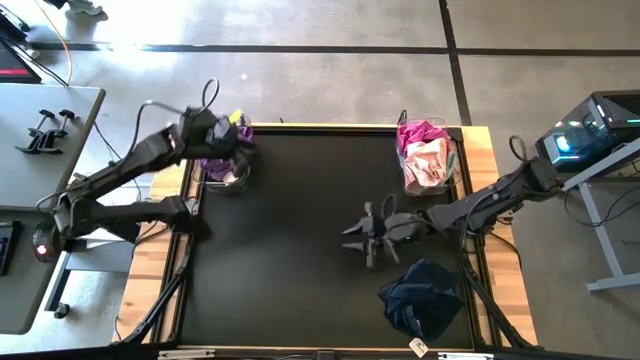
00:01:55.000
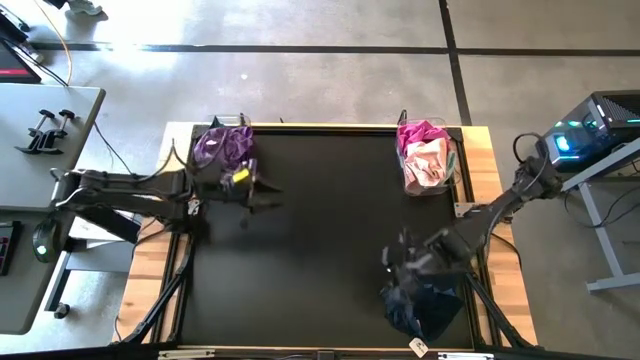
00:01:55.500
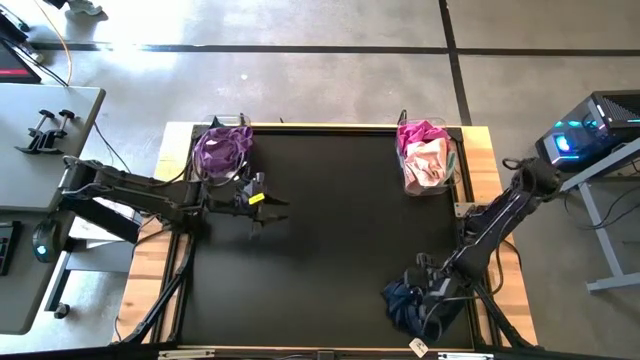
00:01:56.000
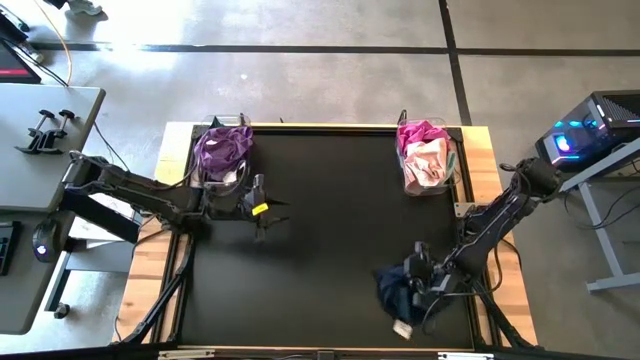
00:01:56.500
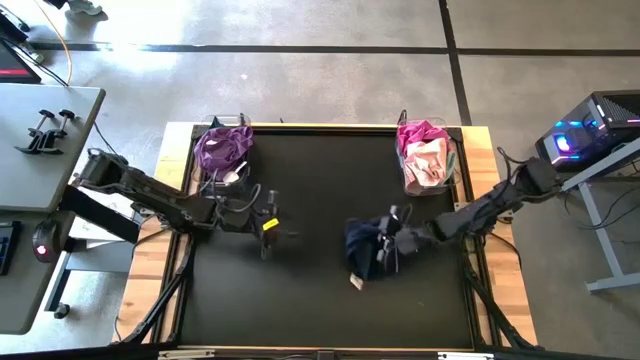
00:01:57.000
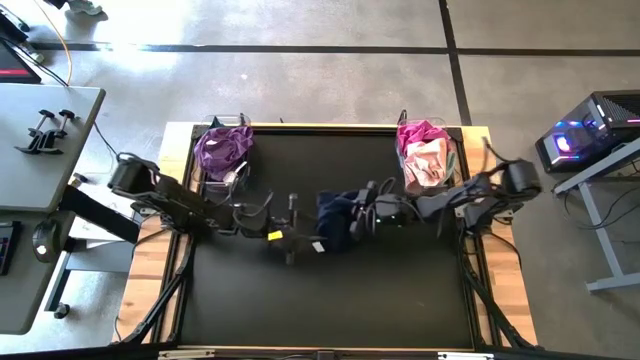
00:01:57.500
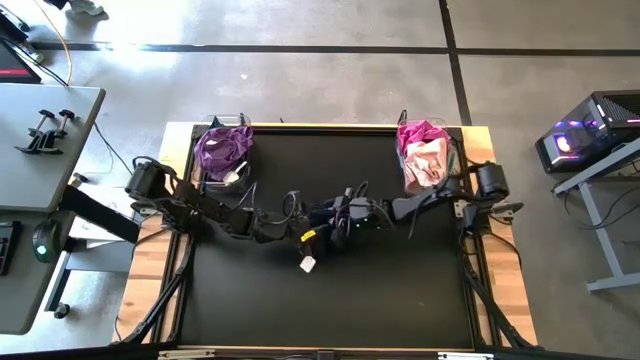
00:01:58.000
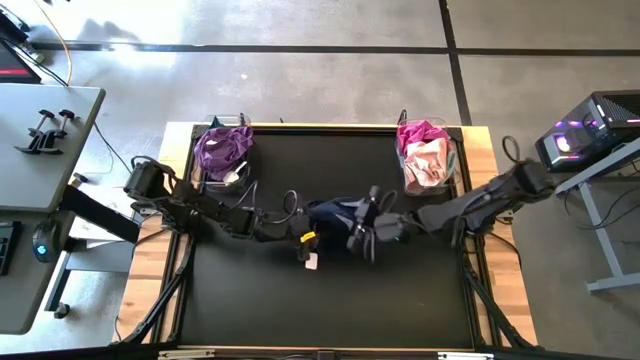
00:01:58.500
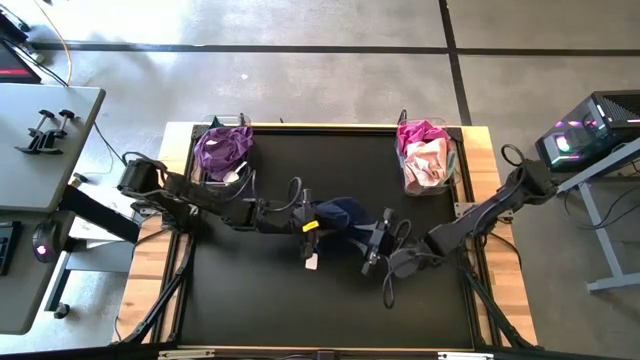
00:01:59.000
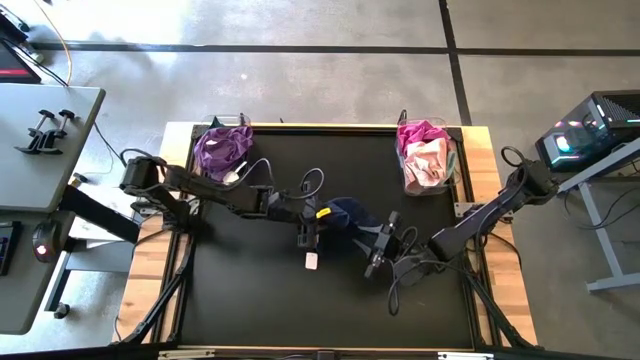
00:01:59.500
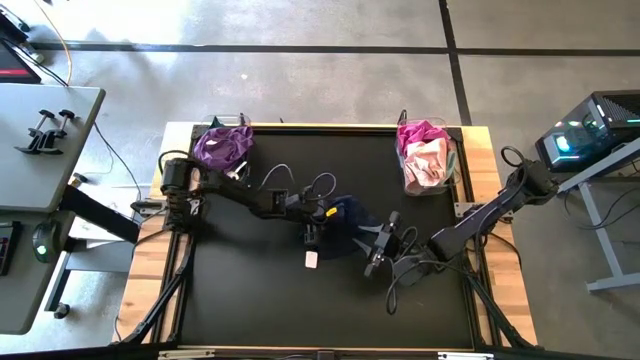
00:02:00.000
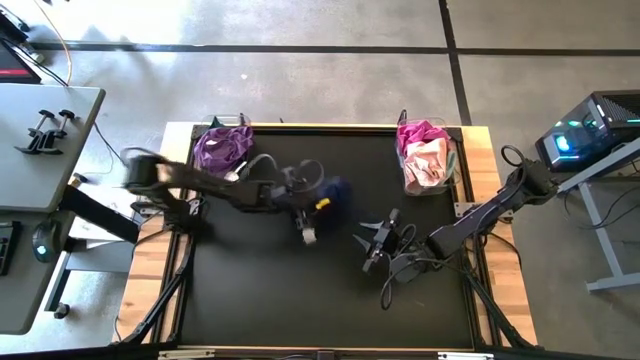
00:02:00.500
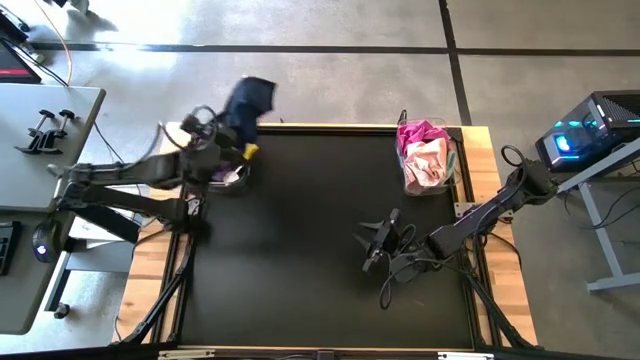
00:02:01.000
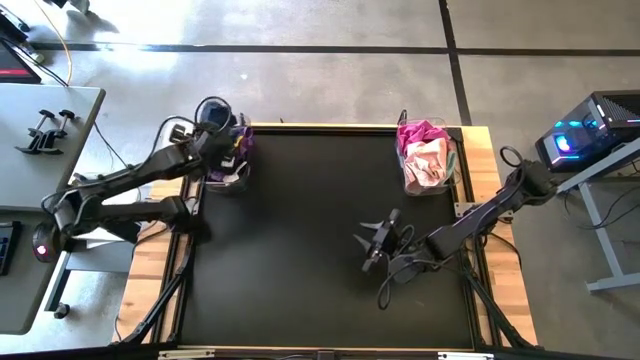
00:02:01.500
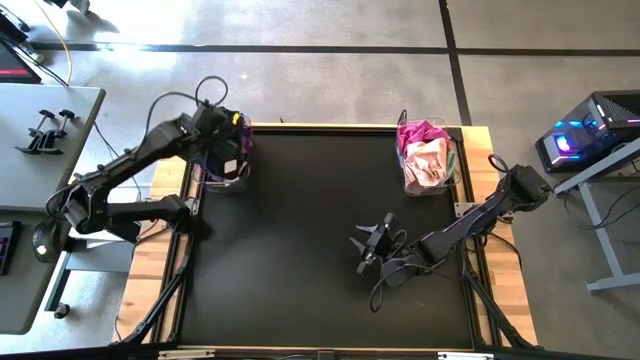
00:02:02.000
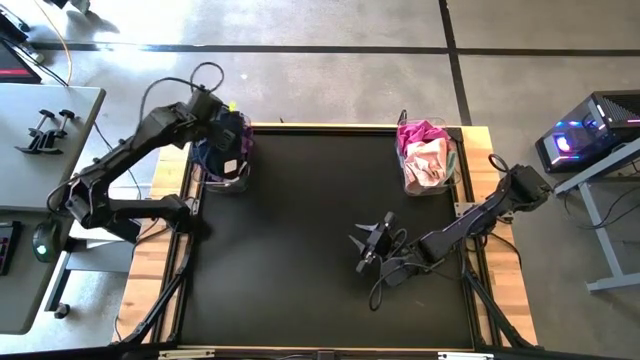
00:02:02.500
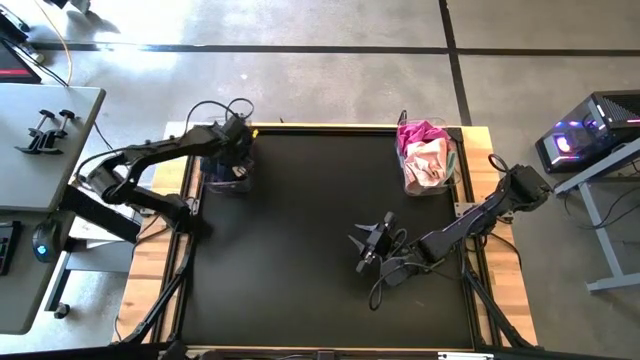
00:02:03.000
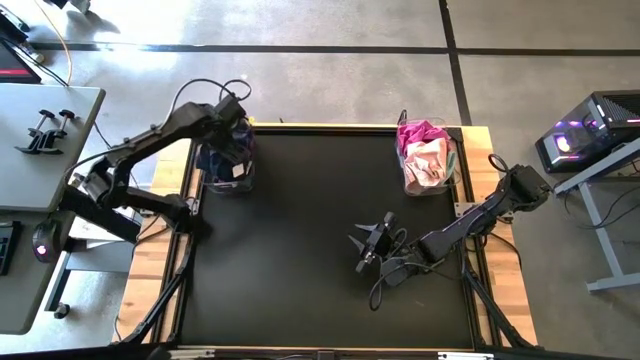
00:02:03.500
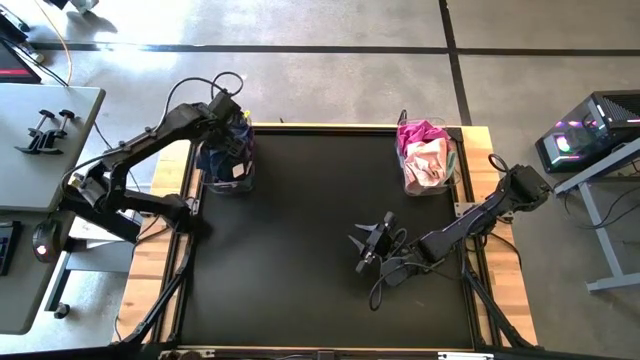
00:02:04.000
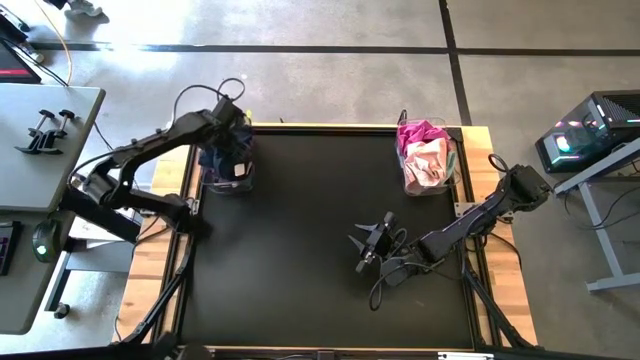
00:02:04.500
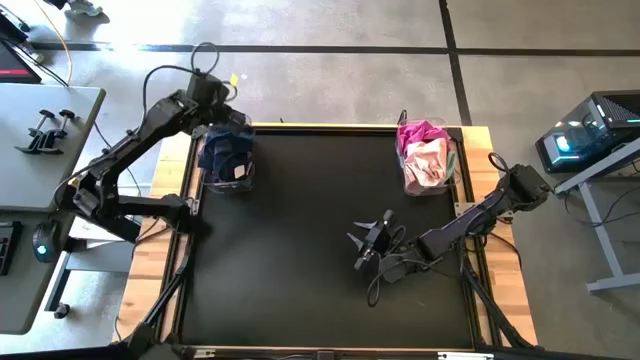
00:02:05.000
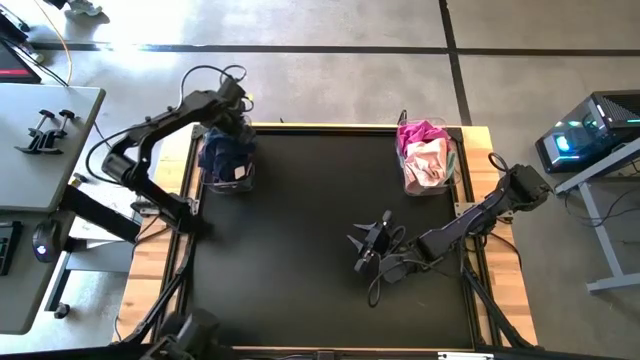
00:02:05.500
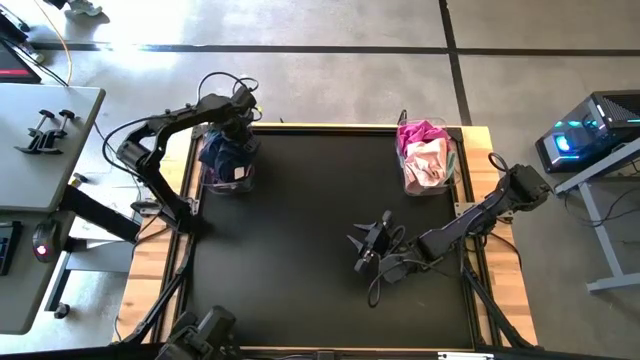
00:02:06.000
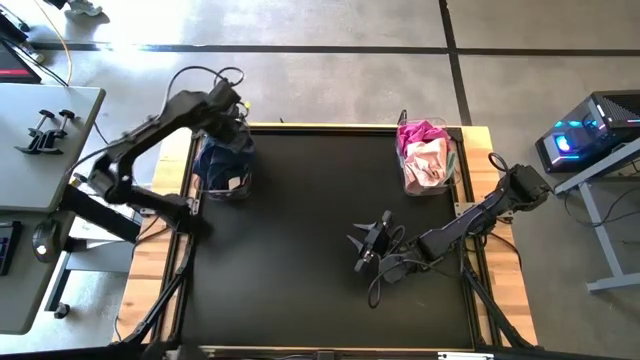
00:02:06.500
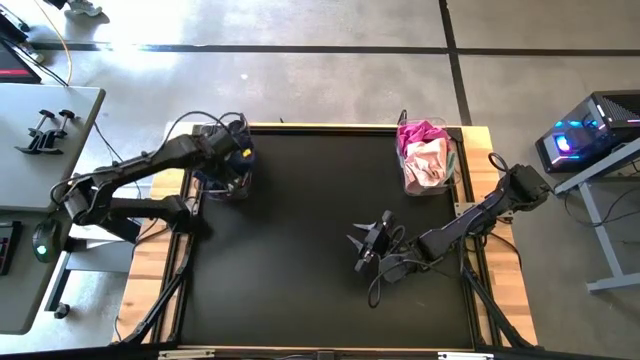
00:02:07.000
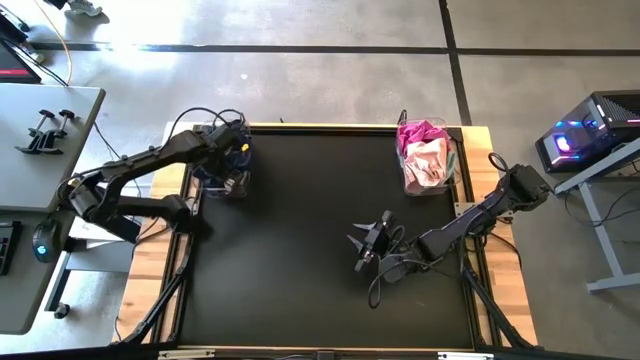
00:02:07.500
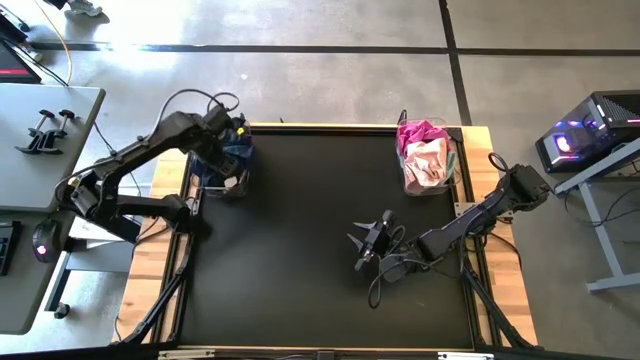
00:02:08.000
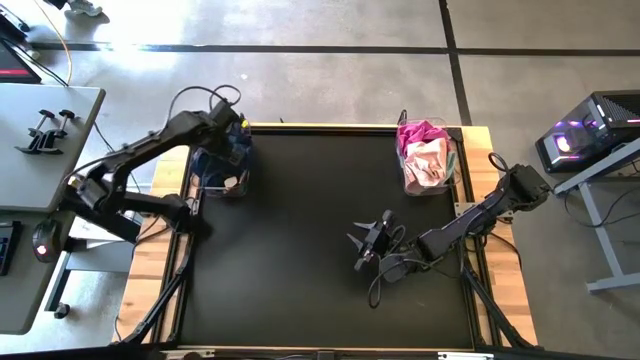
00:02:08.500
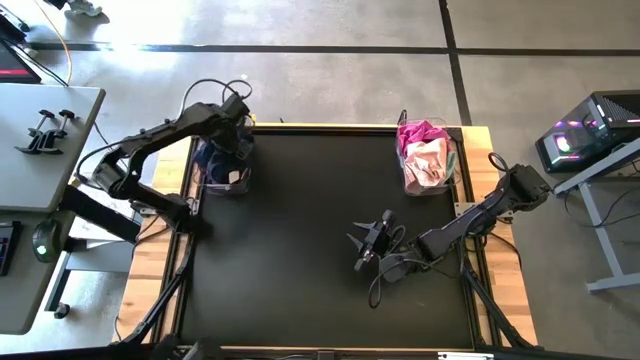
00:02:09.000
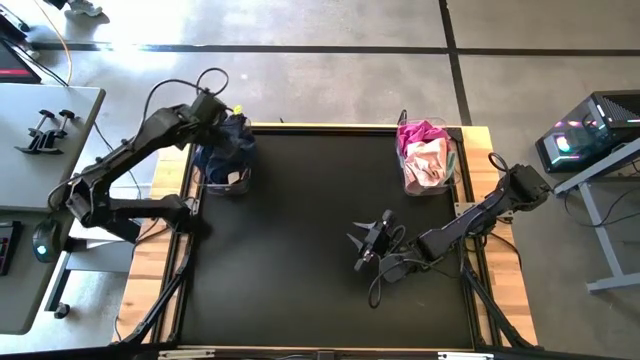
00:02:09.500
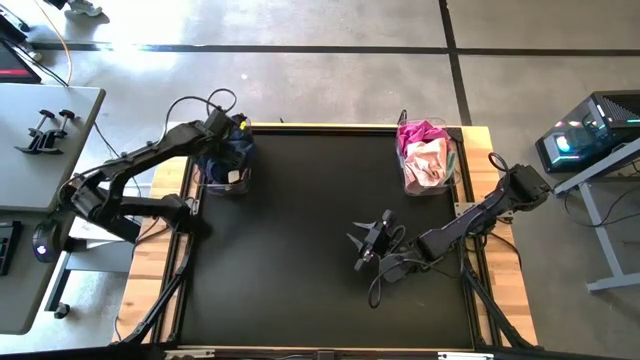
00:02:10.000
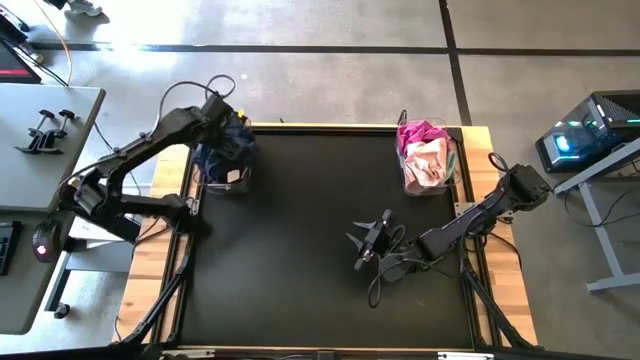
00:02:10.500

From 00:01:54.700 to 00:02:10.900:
Task: Sort towels by color in basket
Put the dark blue microfiber cloth into the left transparent bin

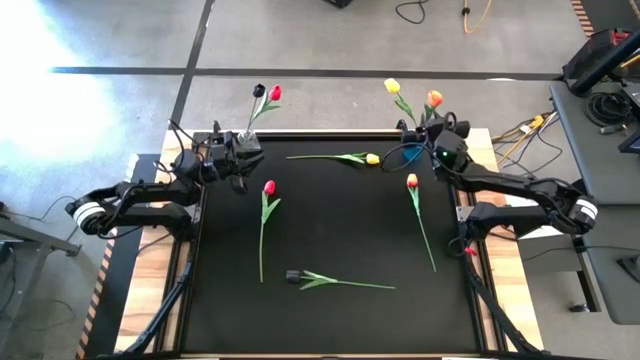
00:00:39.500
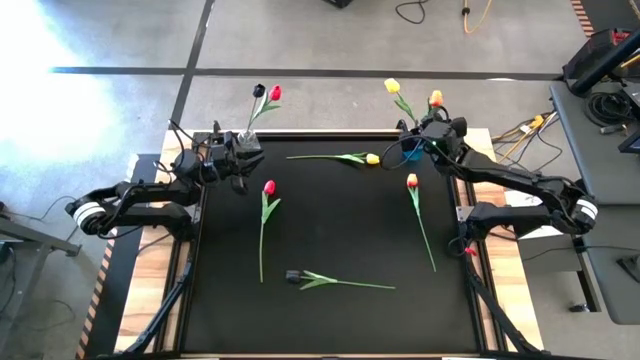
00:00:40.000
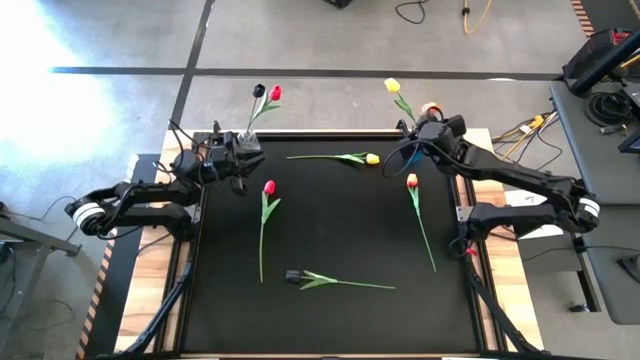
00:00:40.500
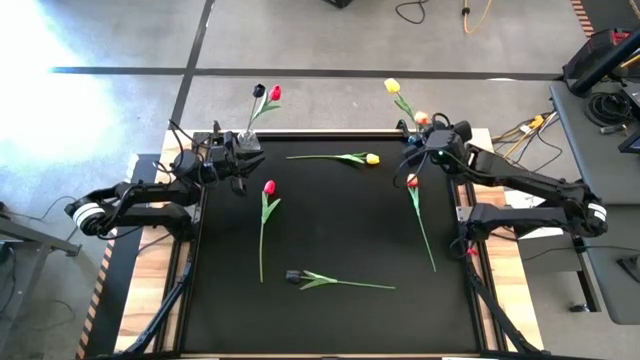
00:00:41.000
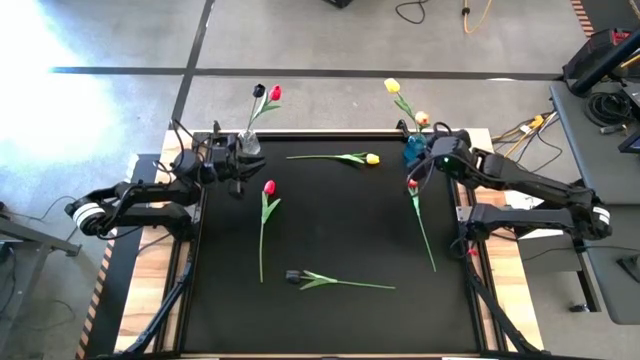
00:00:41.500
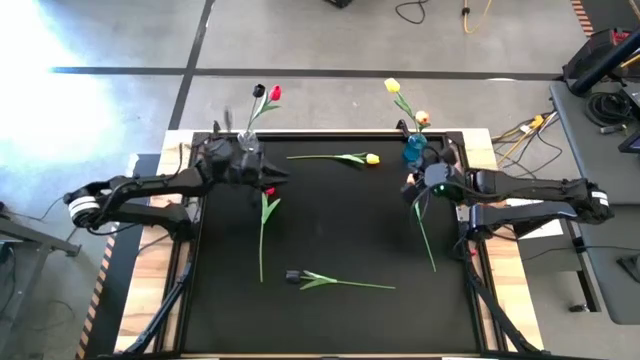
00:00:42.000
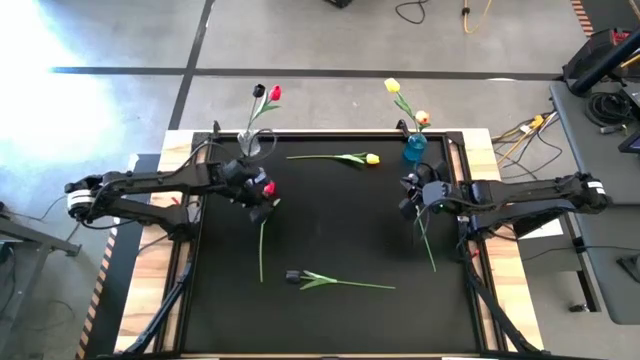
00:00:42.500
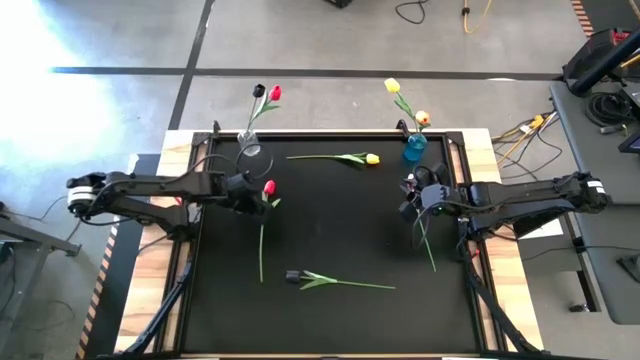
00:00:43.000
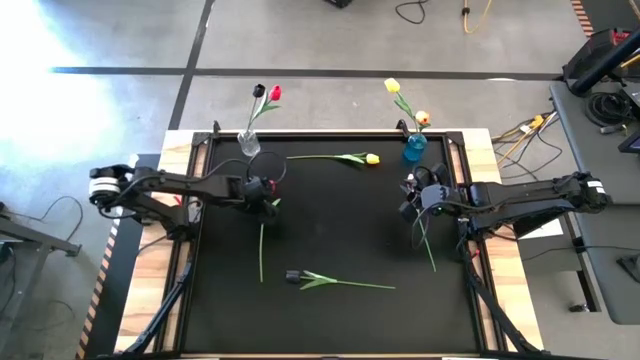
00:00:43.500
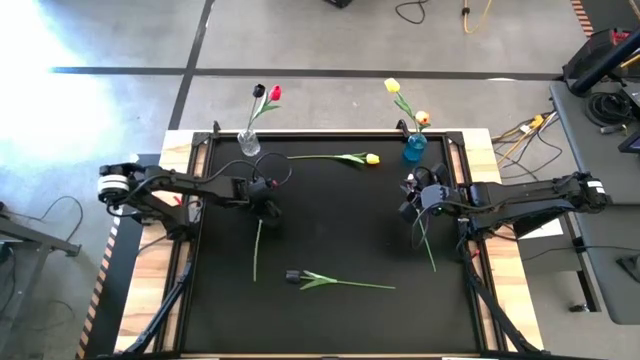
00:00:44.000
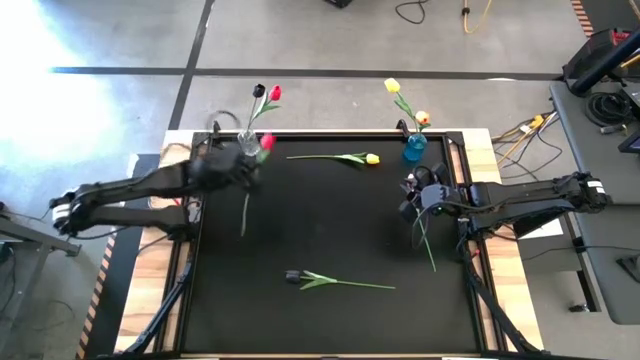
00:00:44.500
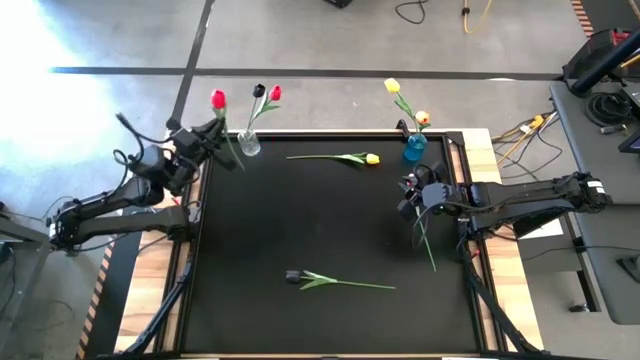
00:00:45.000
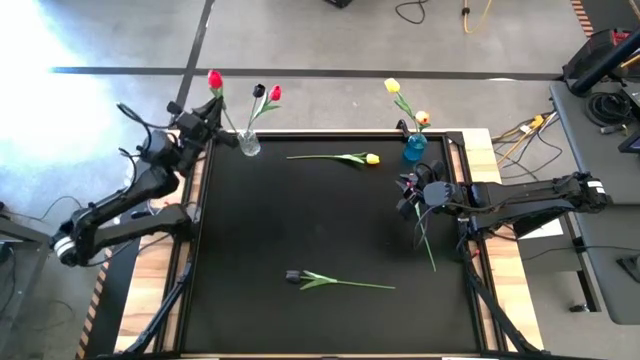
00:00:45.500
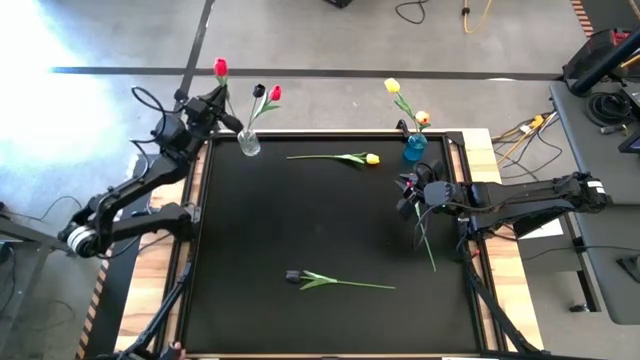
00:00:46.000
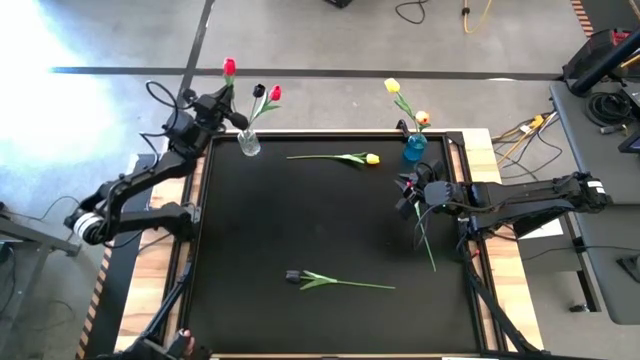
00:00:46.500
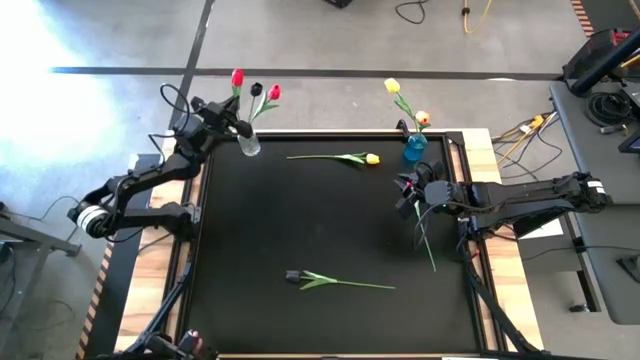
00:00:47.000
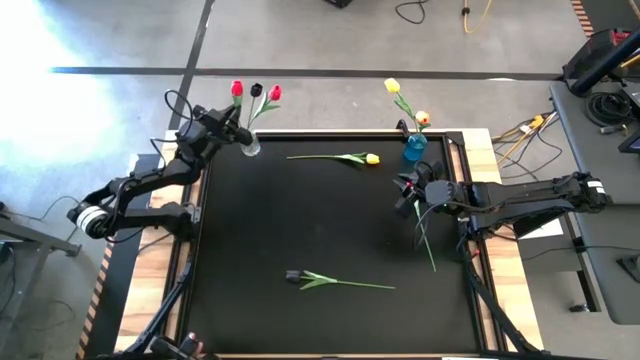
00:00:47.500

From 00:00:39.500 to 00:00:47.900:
Task: Sort flowers into vase by color
Put the red tulip into the transparent flower vase
